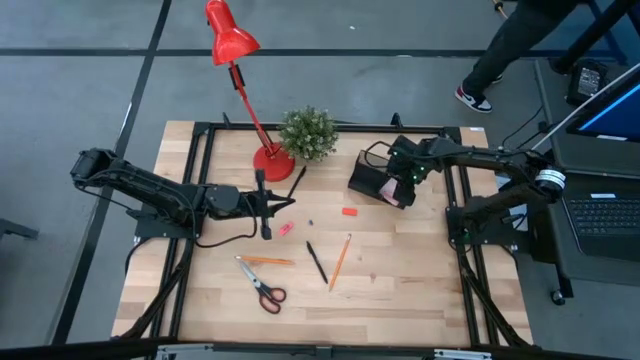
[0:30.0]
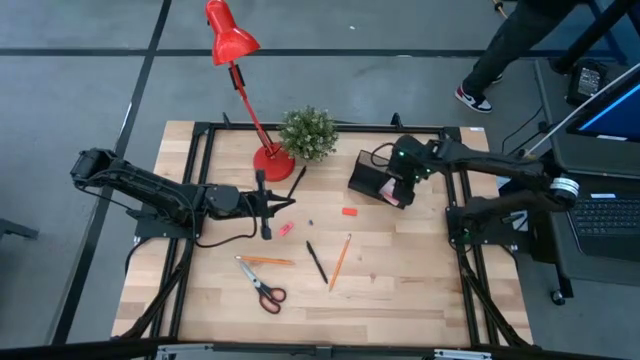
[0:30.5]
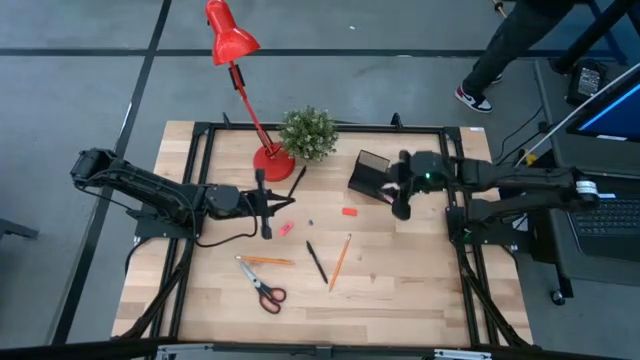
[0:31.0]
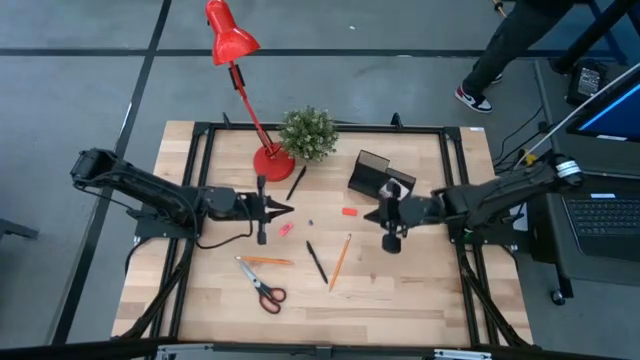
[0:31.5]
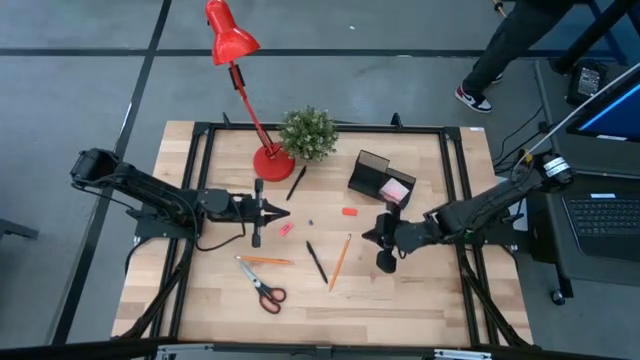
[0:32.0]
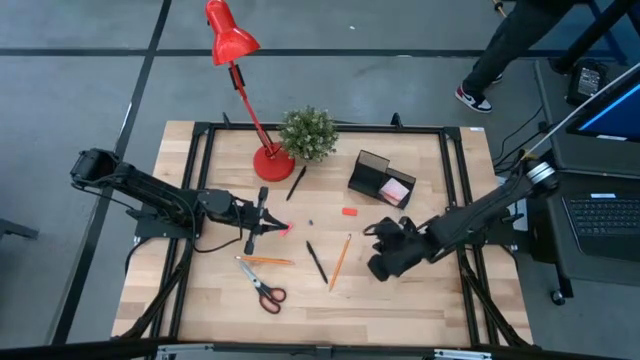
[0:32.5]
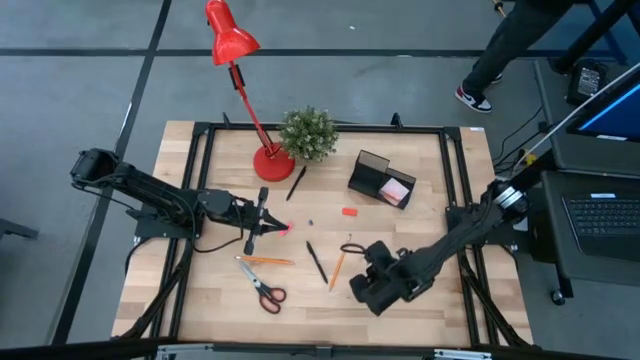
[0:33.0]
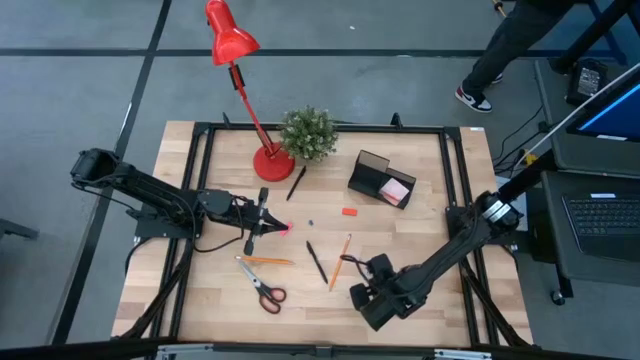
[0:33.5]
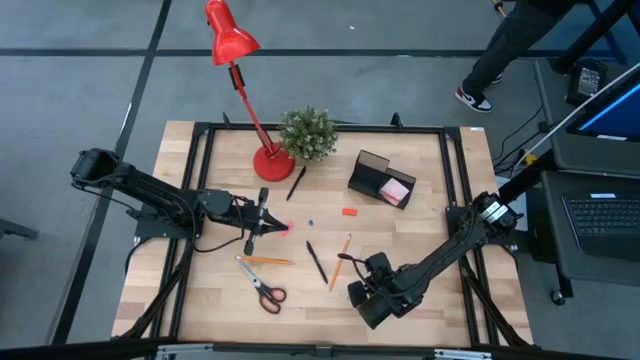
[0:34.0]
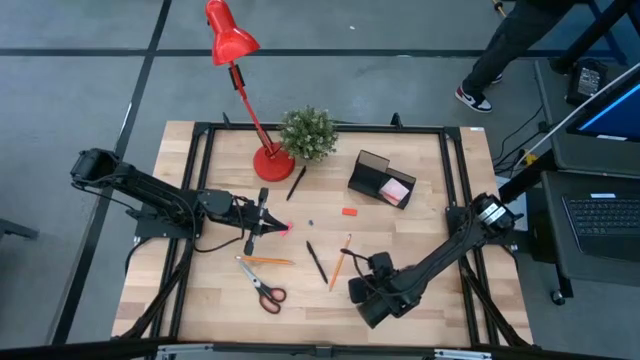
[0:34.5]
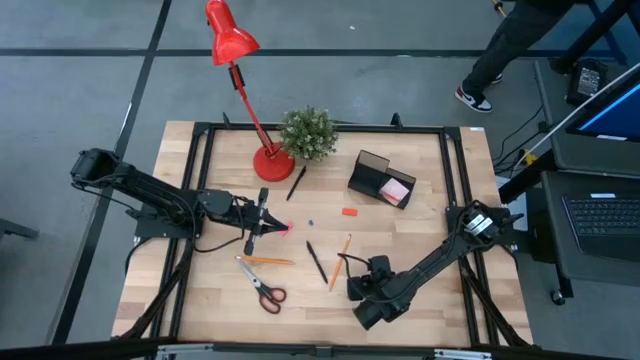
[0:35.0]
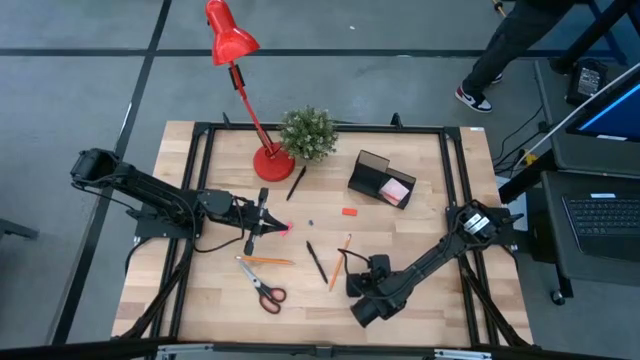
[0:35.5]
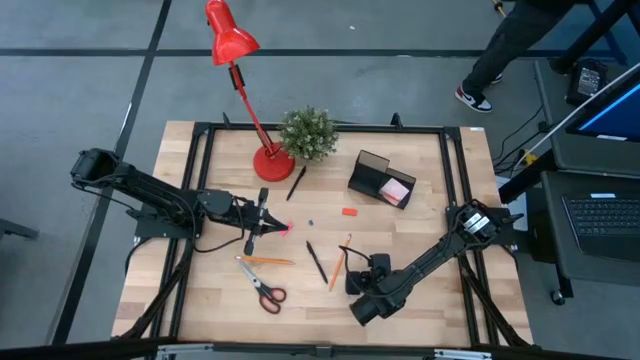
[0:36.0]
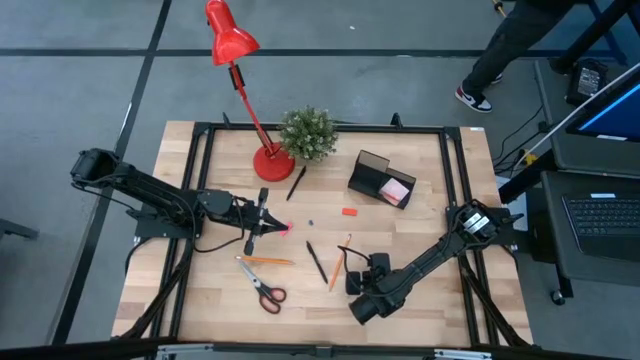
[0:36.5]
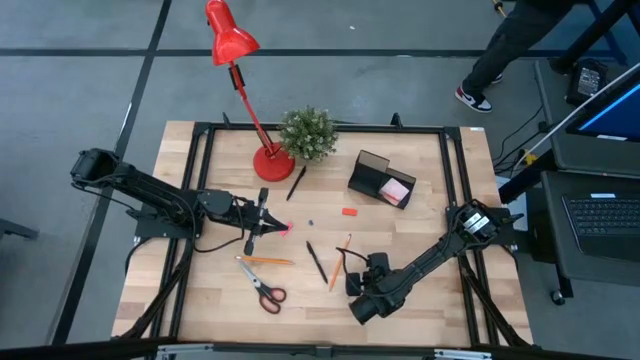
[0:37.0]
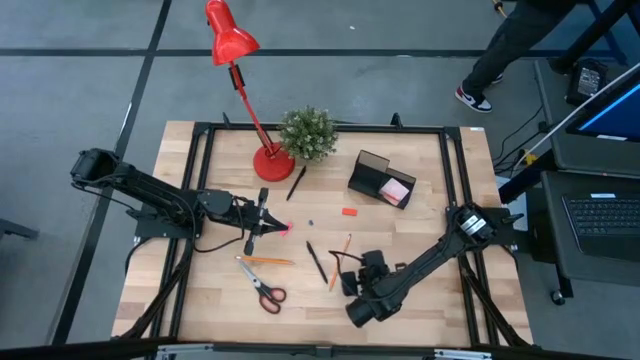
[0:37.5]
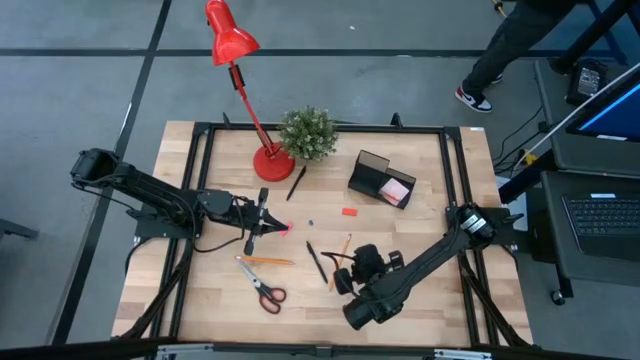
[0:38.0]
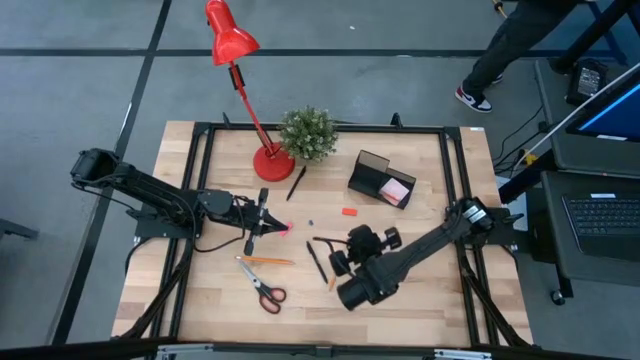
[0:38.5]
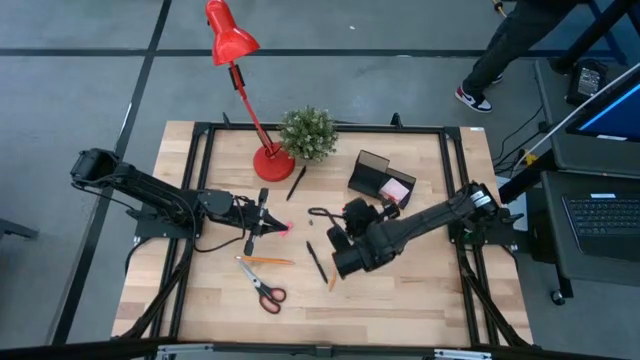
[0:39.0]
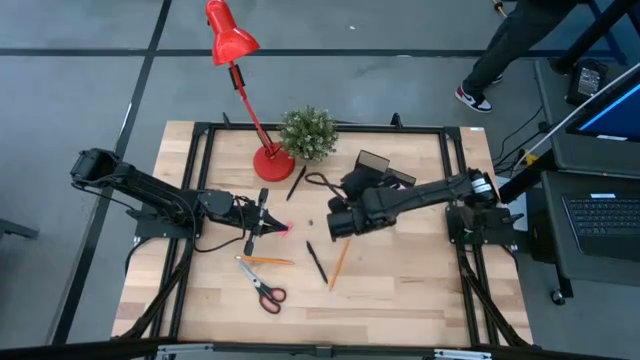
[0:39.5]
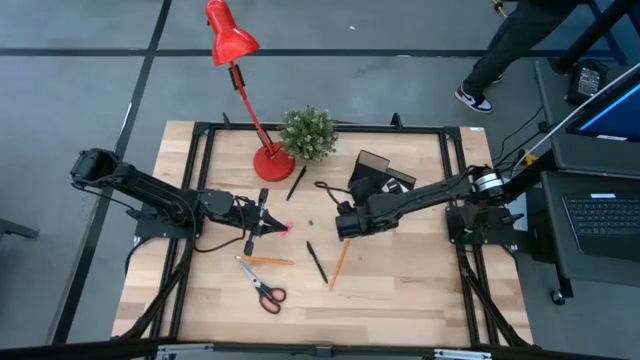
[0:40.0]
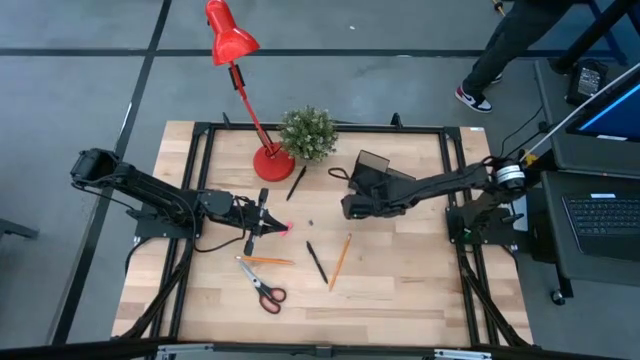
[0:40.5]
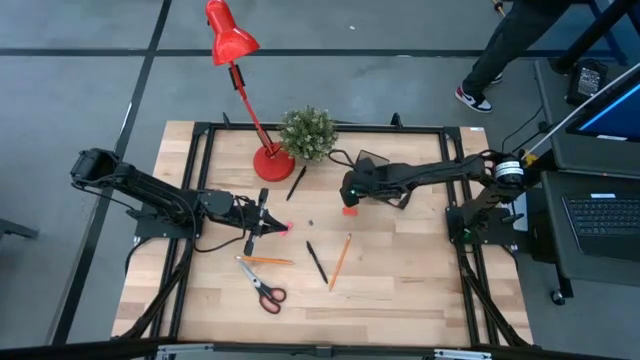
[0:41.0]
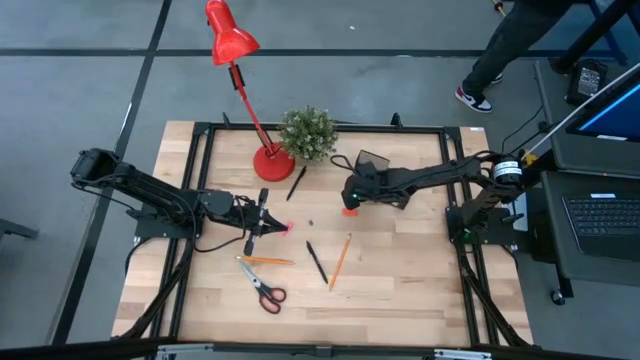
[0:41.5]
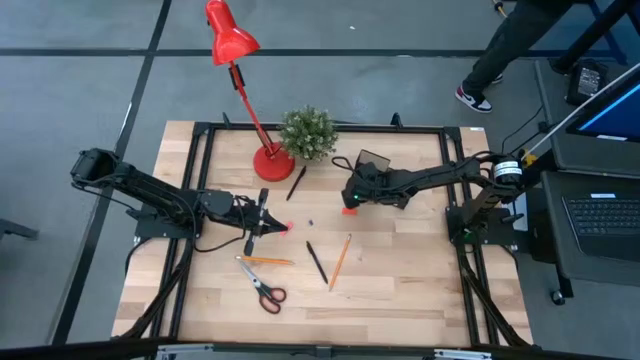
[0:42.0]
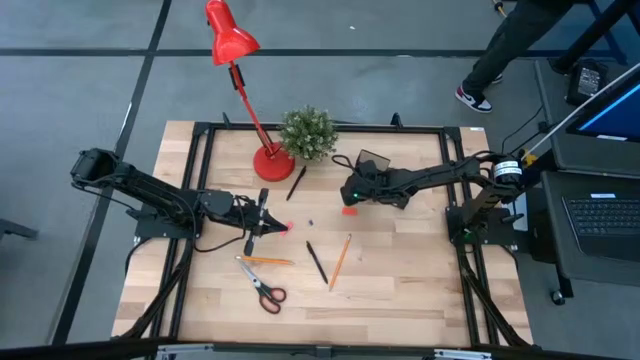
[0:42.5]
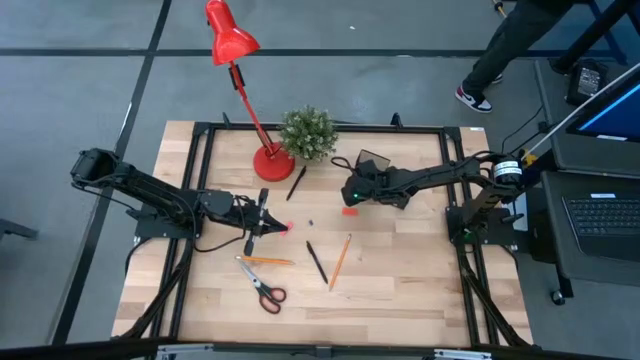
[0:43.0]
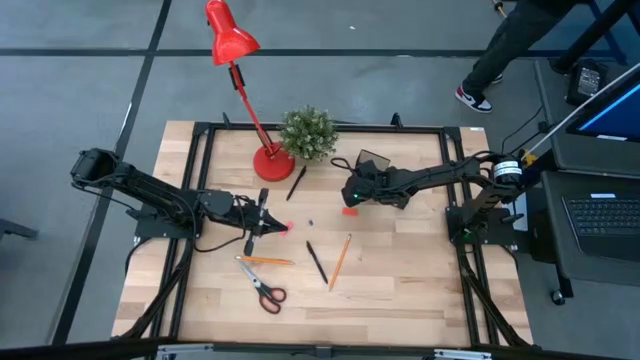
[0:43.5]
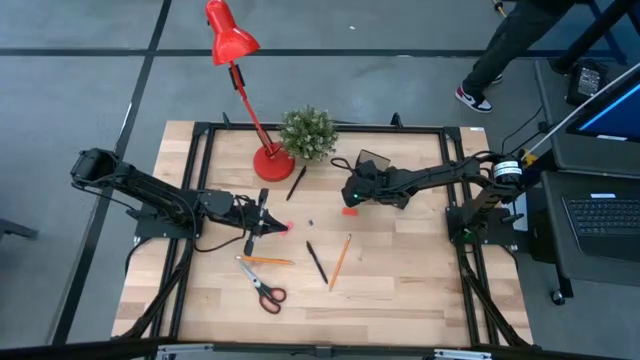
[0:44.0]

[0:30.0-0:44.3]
Task: Pick and place office supplies into organizer
Put the pink binder clip into the black desk organizer

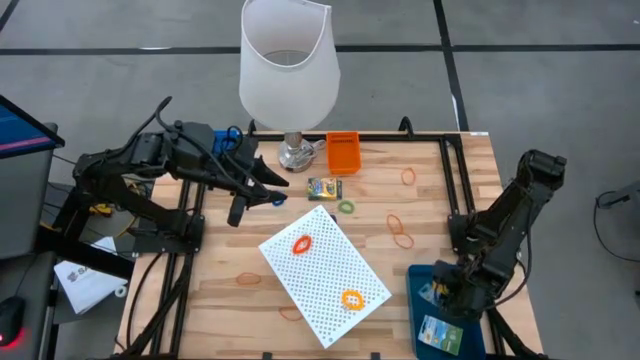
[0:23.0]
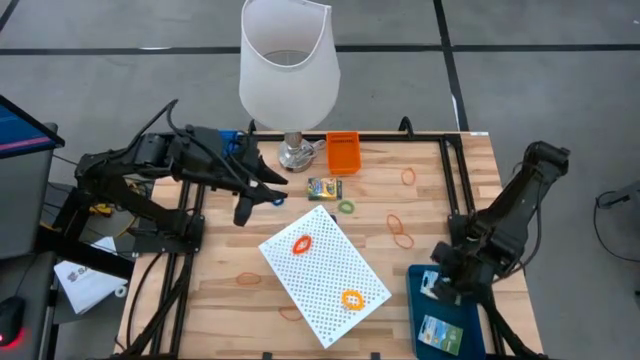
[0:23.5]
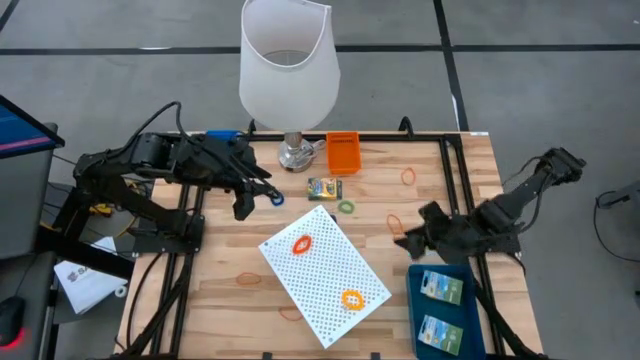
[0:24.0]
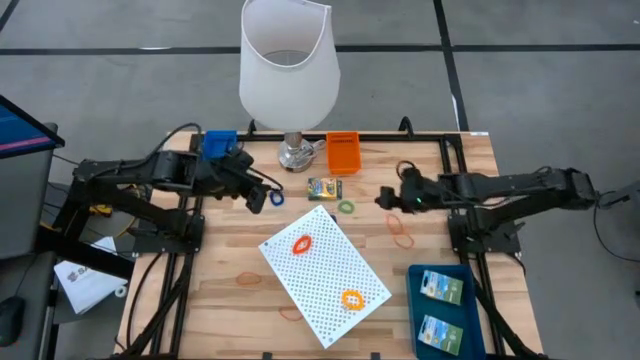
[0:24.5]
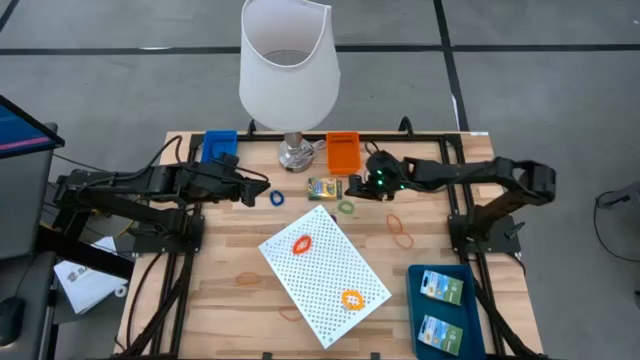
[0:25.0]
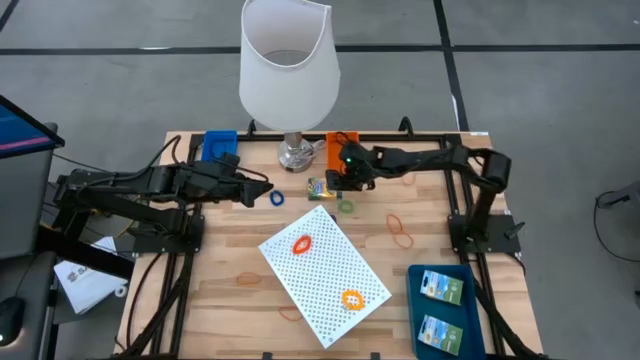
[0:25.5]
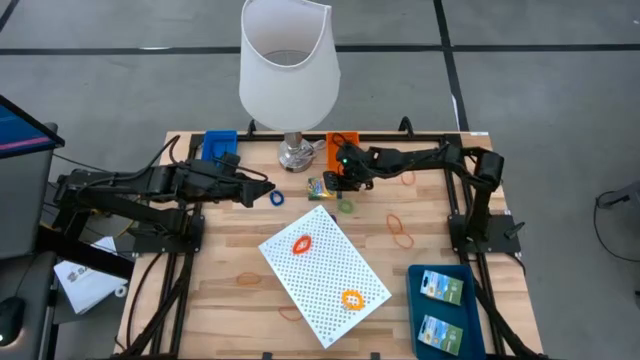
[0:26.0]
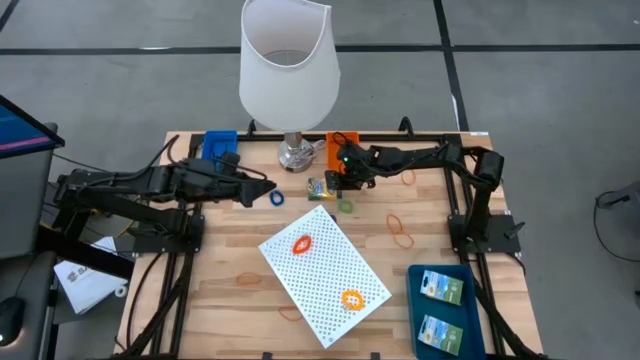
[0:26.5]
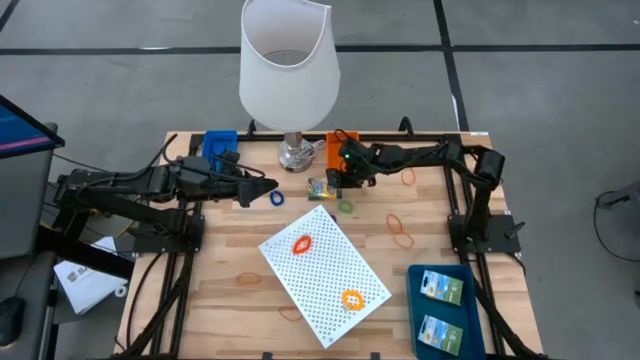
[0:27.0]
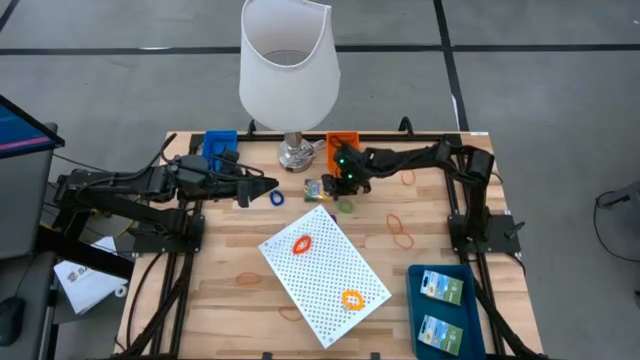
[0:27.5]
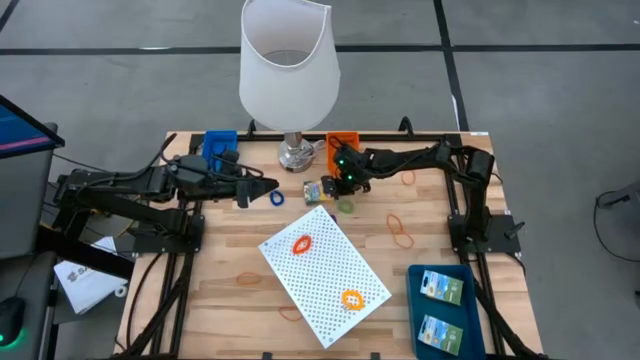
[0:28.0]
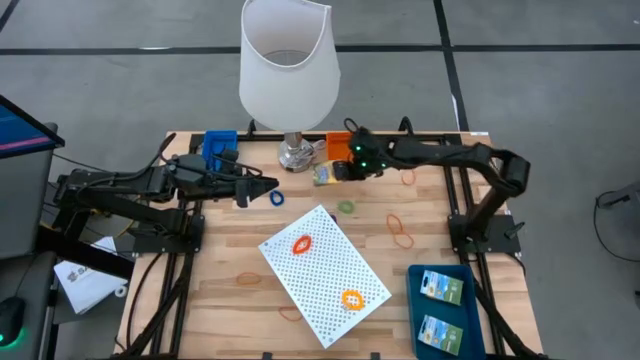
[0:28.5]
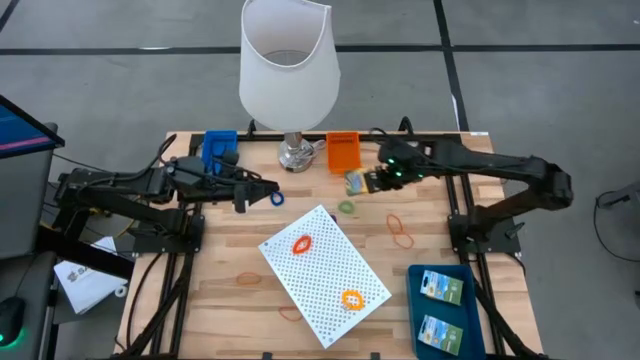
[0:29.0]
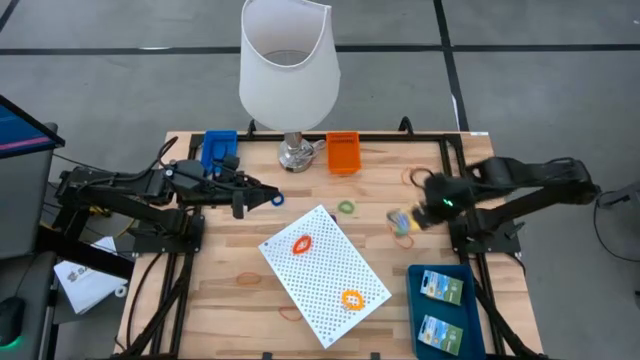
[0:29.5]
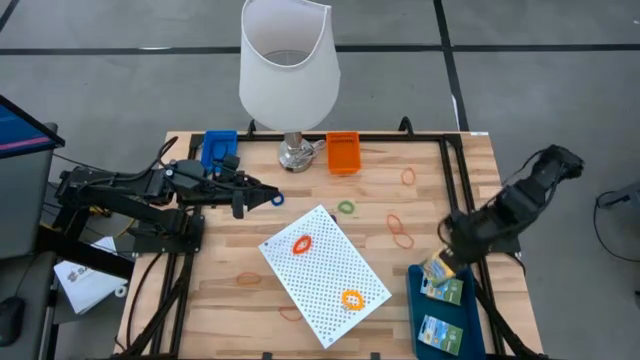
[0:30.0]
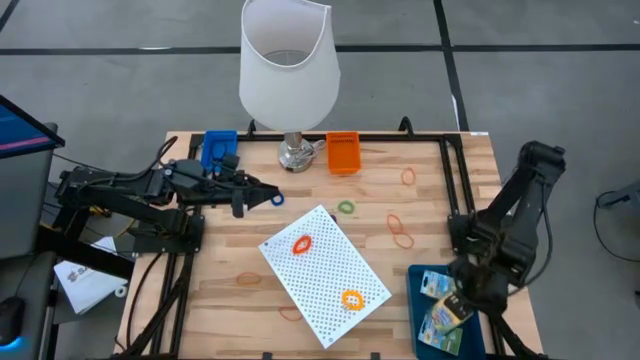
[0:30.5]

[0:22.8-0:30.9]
Task: Pick & Place Office Desk Supplies
Put the crayon box into the blue bin
